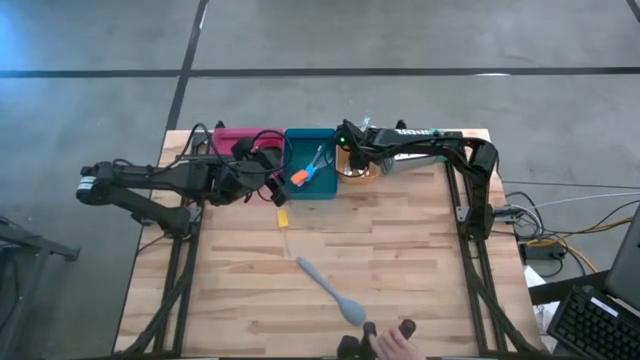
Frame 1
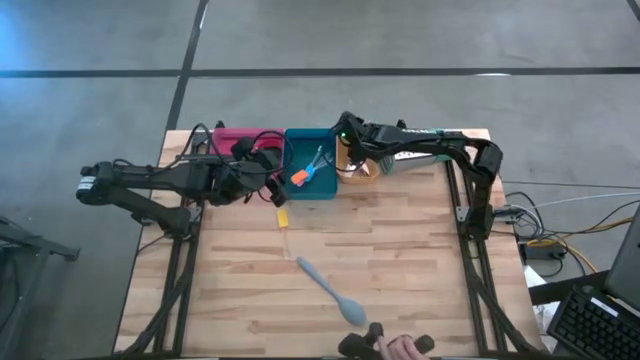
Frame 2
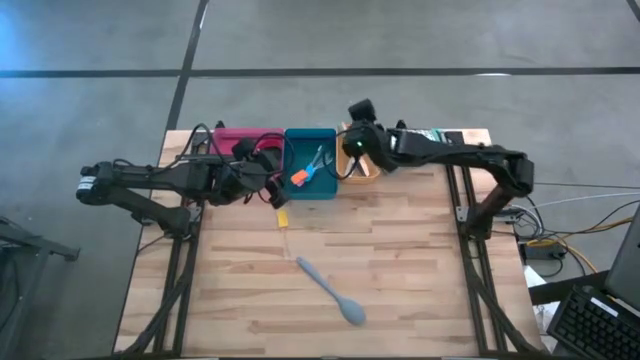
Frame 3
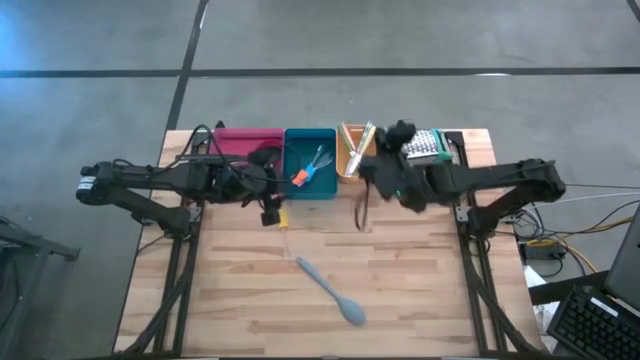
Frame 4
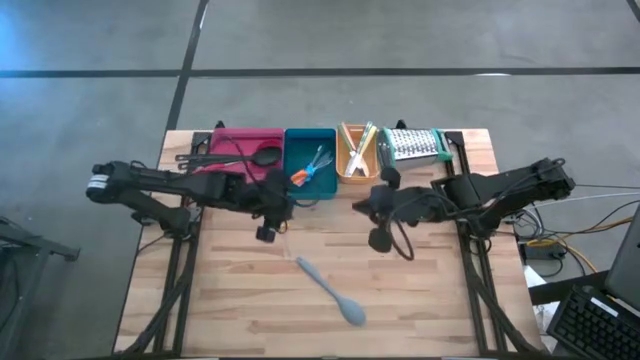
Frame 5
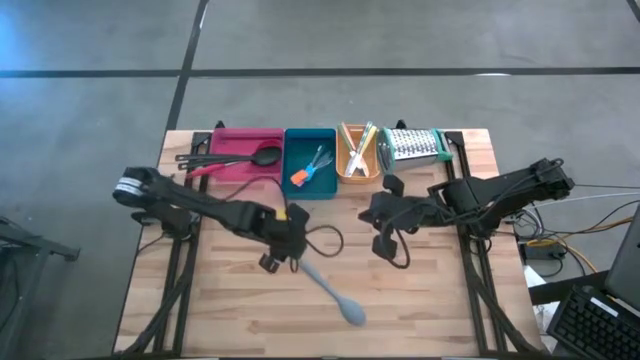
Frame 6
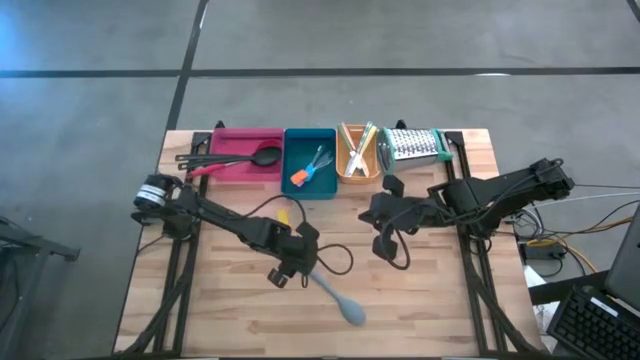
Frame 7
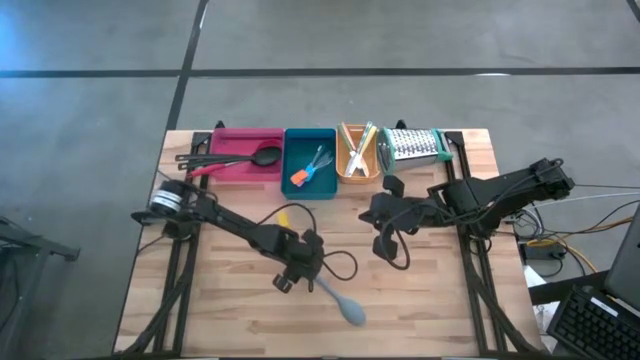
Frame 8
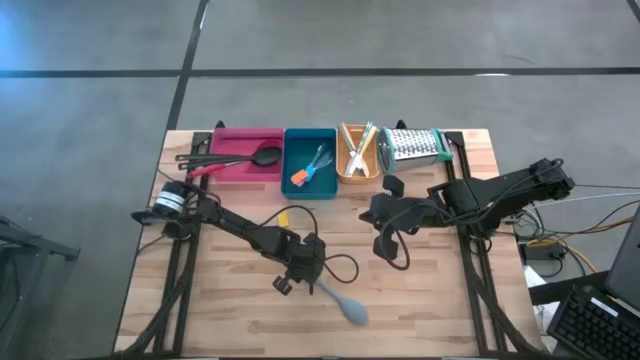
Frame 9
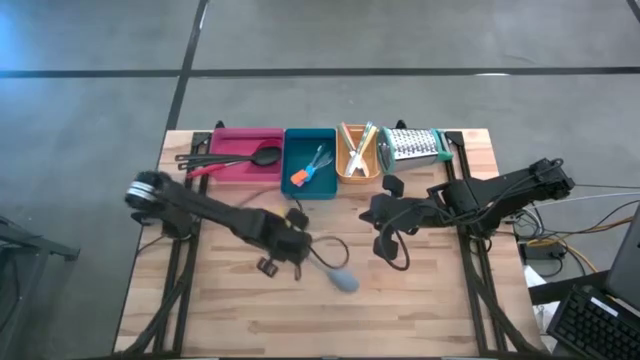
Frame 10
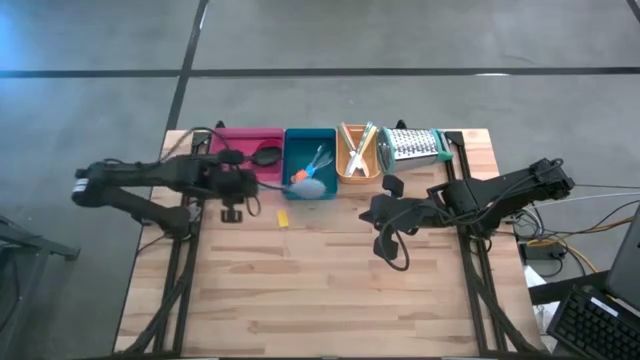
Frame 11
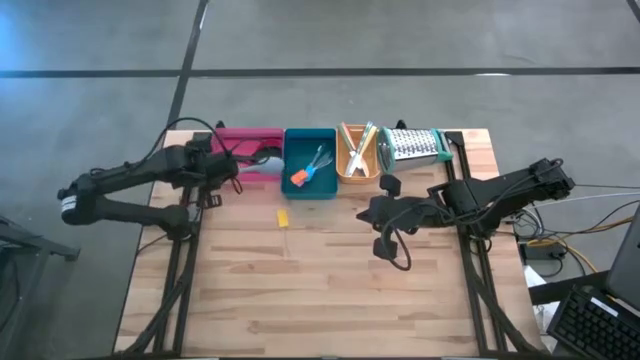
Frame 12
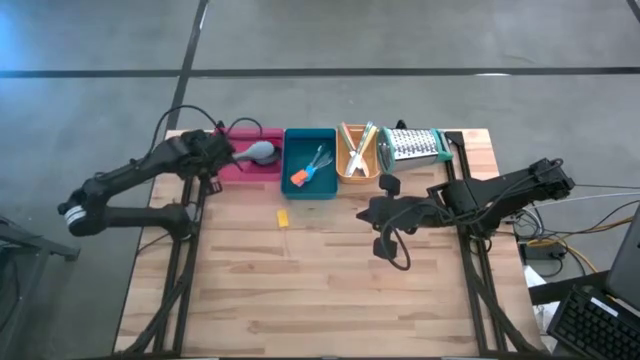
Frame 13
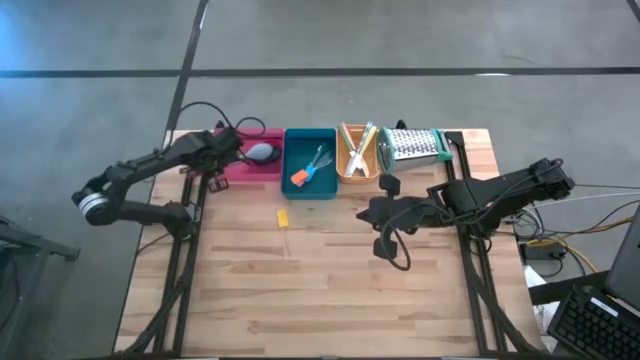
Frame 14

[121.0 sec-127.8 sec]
Task: Pick & Place Kitchen Items
Put the gray spoon into the pink bin

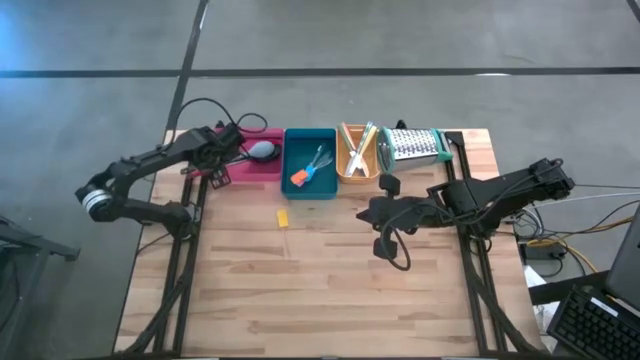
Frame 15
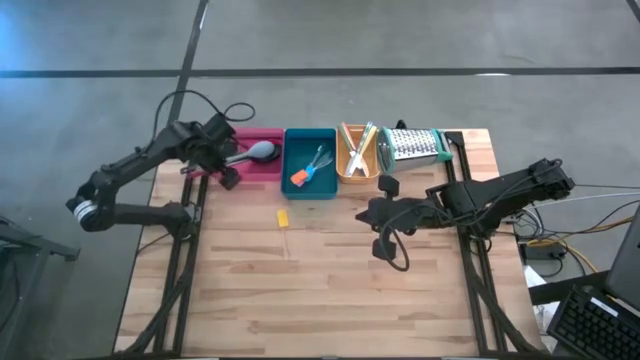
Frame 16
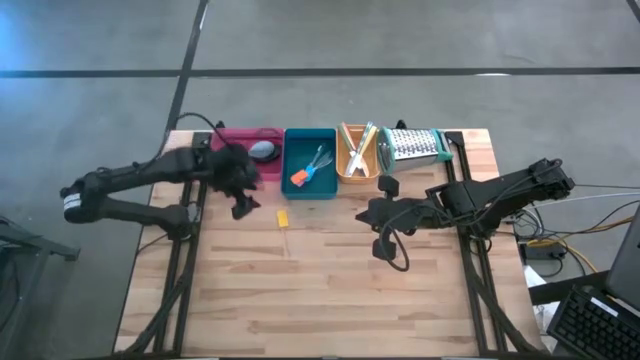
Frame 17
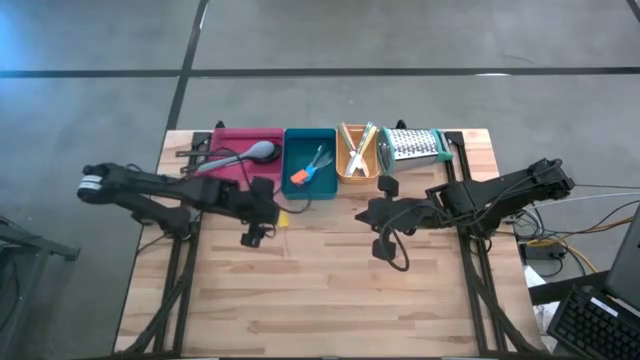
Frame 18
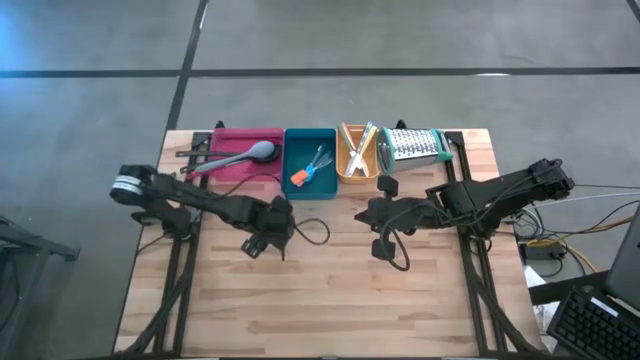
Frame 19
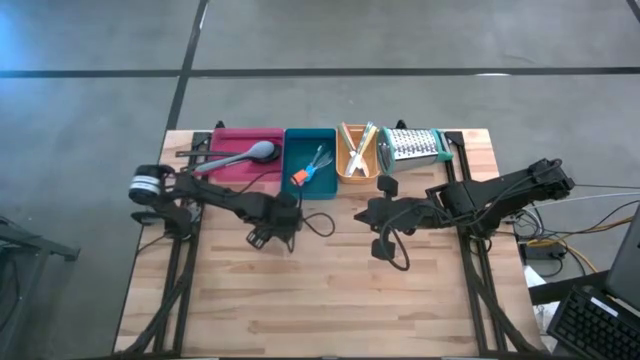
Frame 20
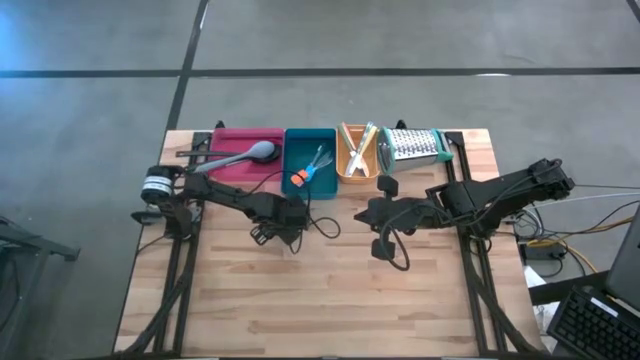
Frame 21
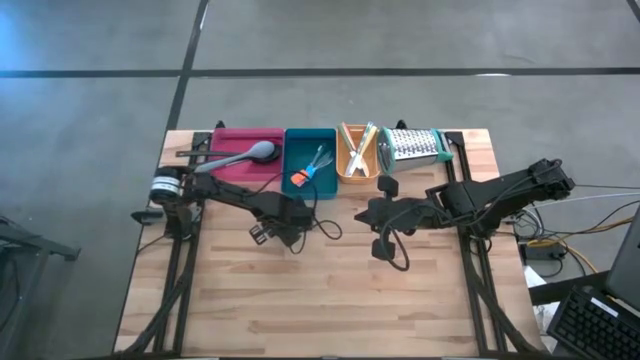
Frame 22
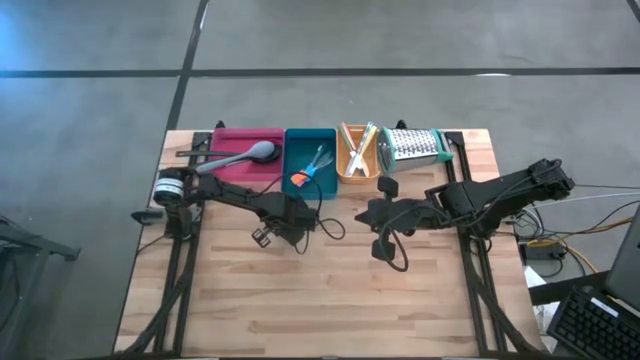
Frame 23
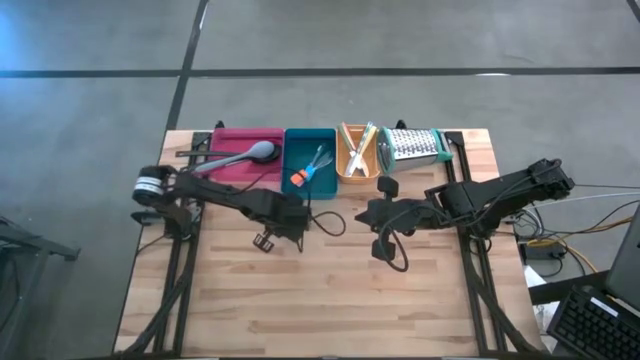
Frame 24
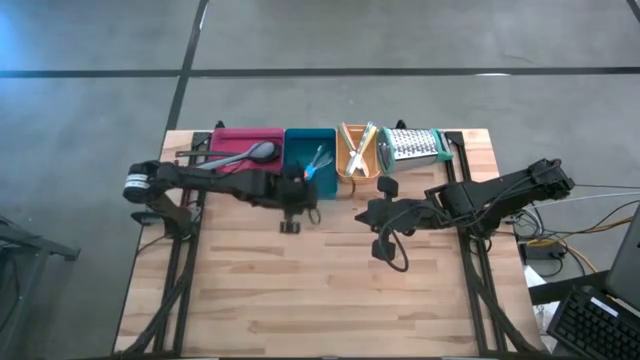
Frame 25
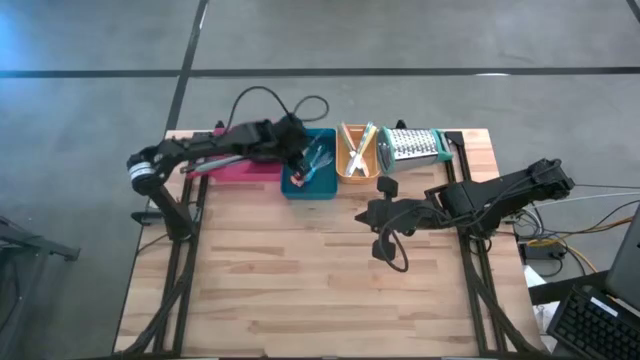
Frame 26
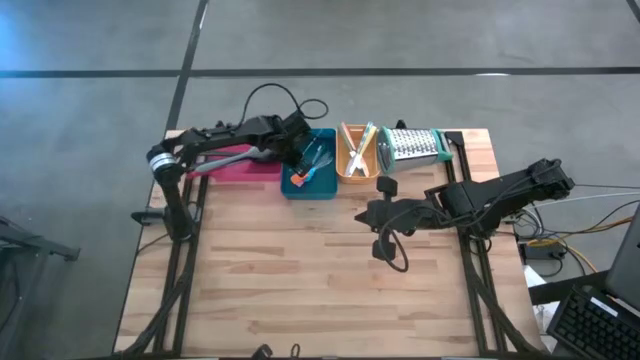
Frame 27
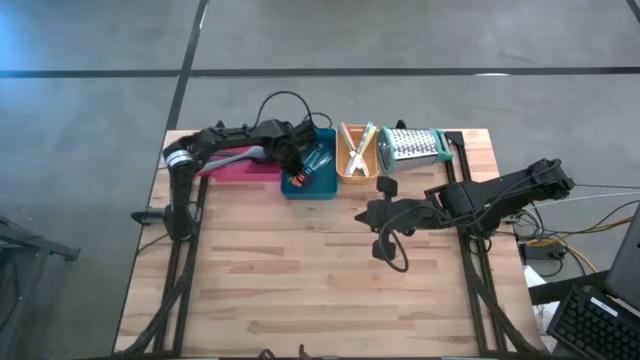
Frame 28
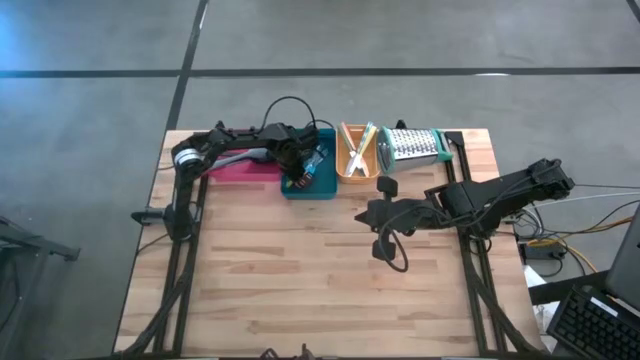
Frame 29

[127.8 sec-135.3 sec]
Put the yellow spatula into the blue bin

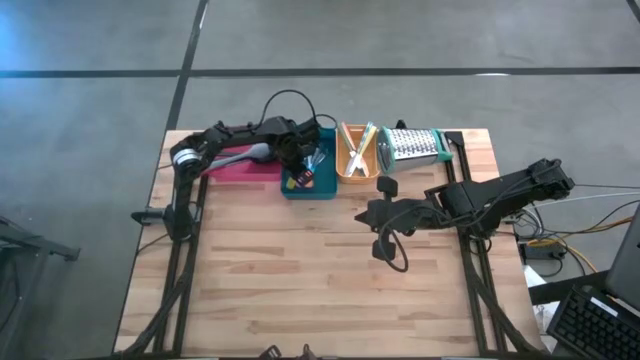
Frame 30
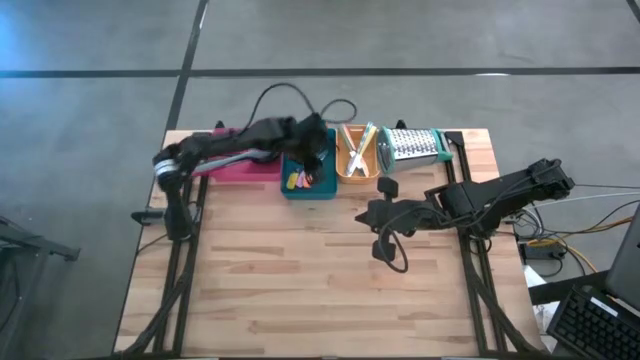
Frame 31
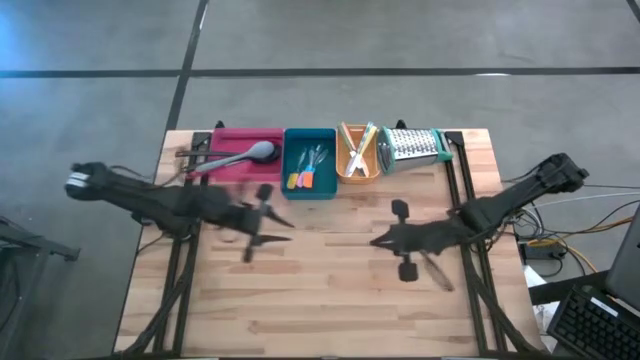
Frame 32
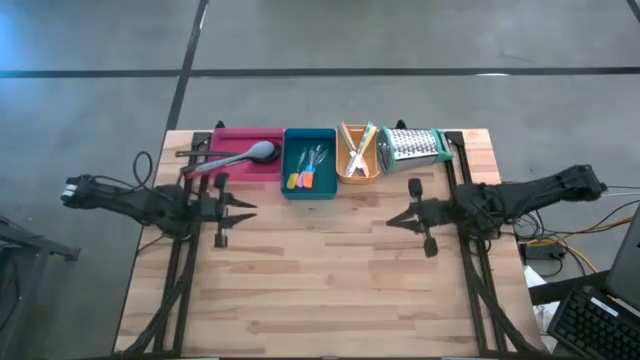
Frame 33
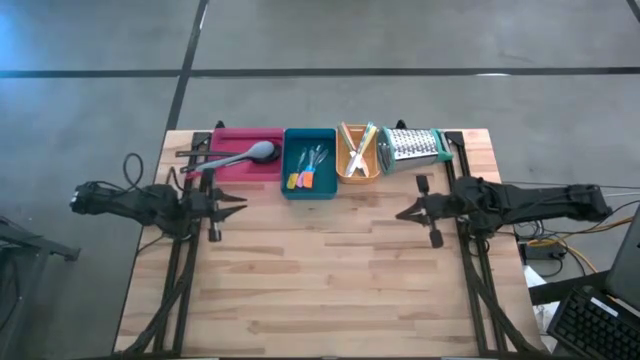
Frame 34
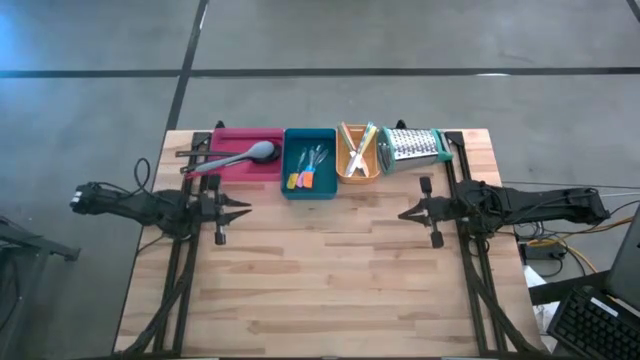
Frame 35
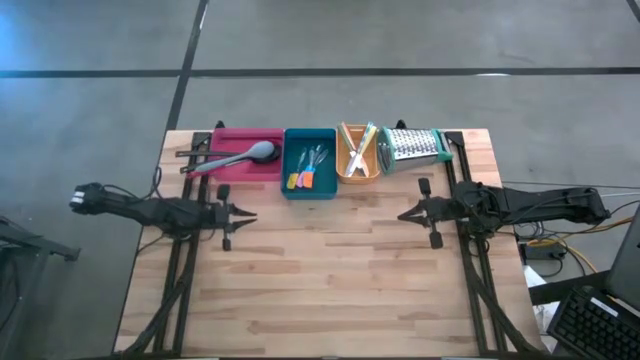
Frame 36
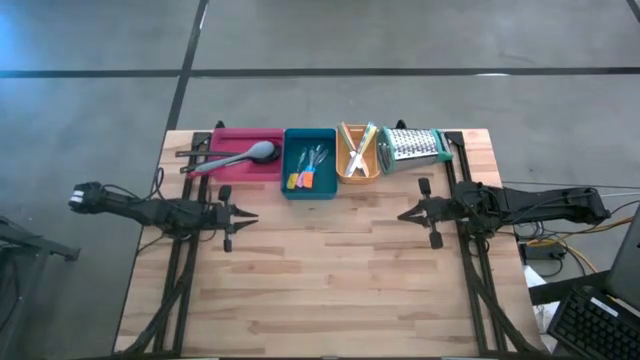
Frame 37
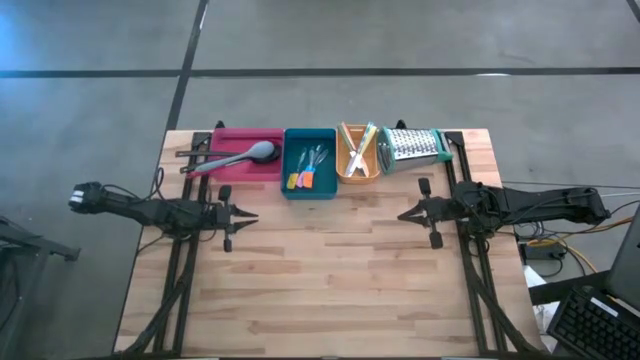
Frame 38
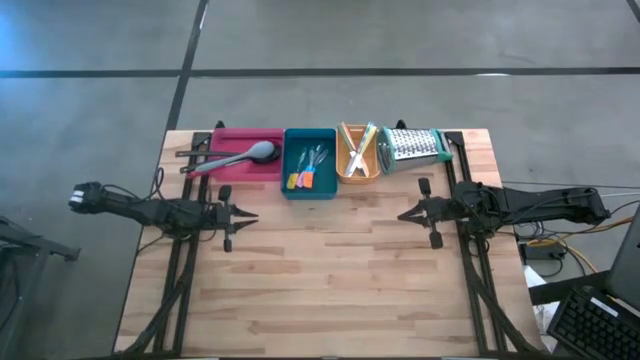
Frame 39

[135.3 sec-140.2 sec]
Return to Home Position

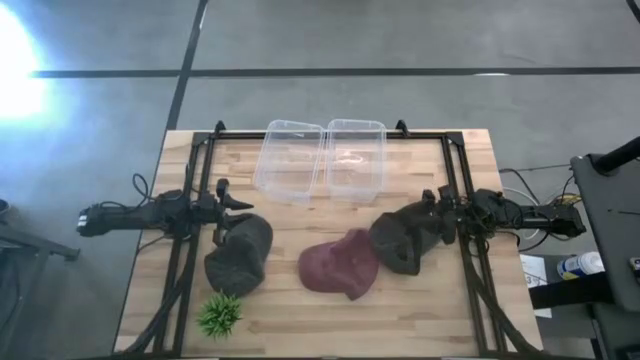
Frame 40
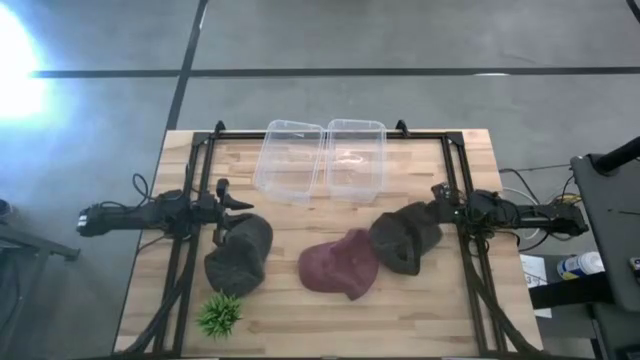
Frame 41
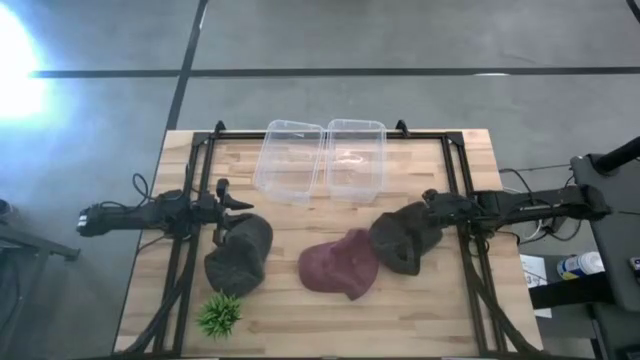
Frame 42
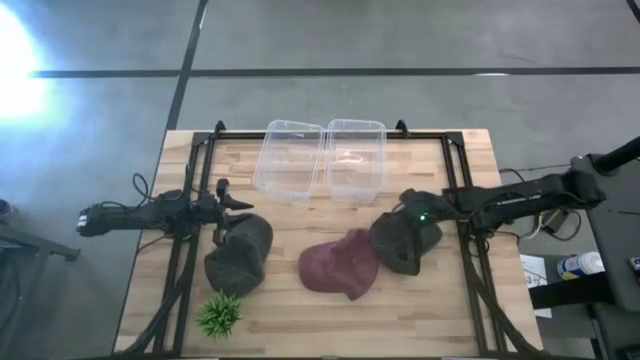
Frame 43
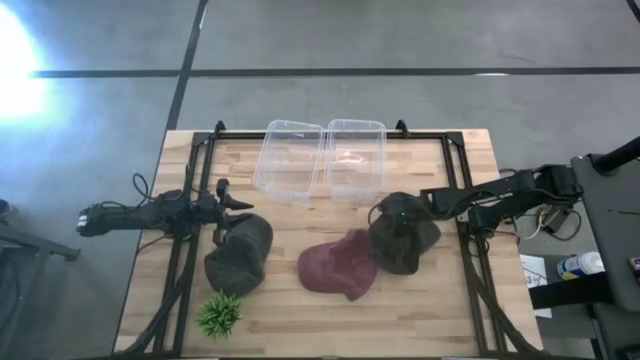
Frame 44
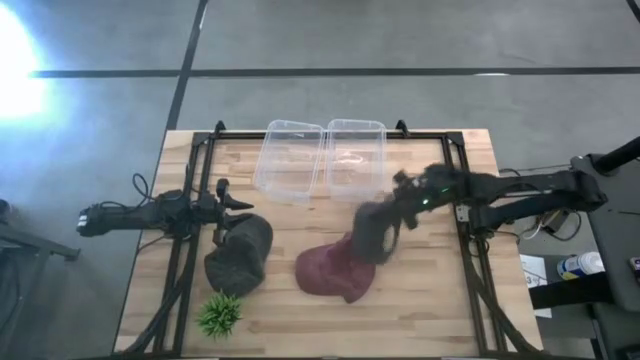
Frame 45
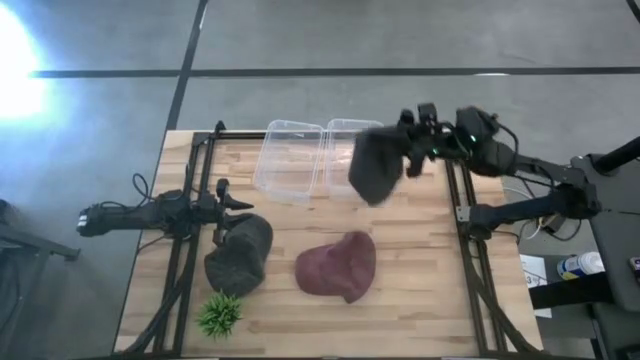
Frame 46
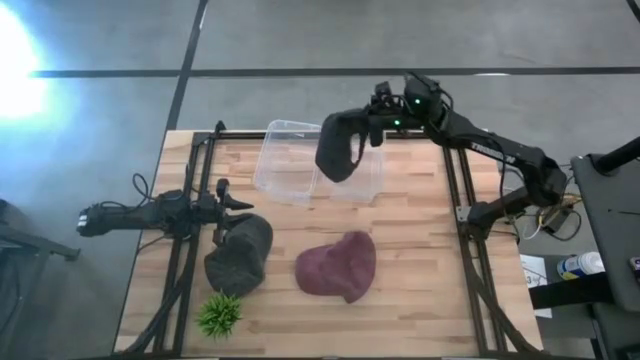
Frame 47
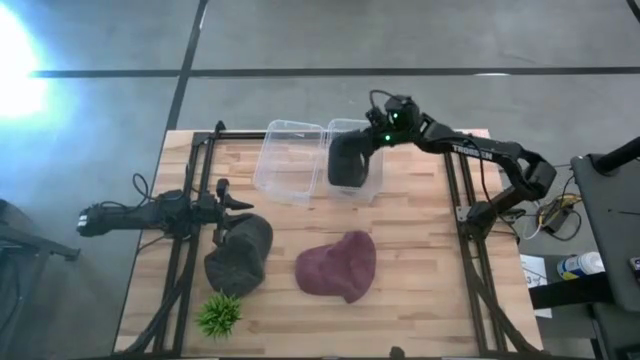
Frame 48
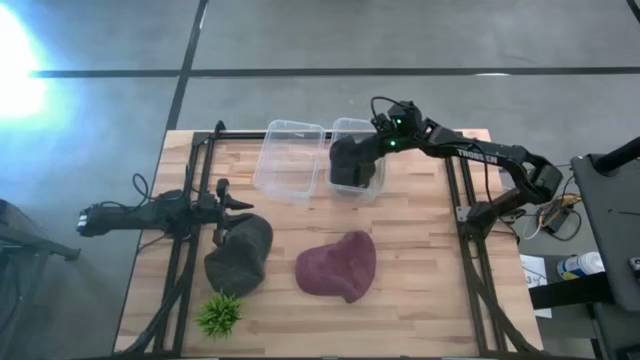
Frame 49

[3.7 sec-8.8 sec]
Task: Pick and place caps into container
Put the left black cap into the right transparent container
